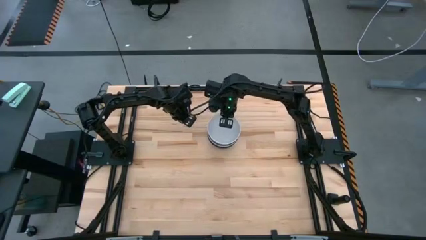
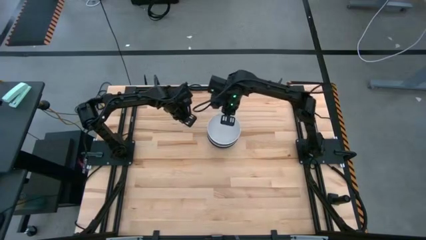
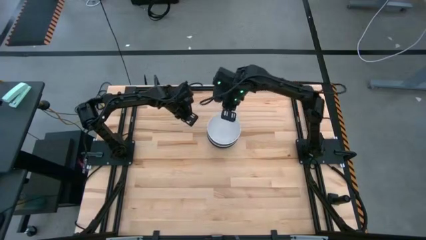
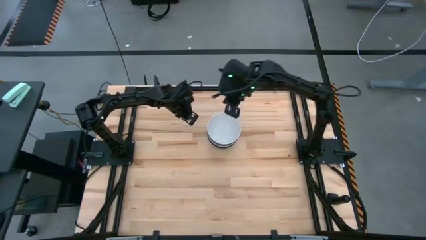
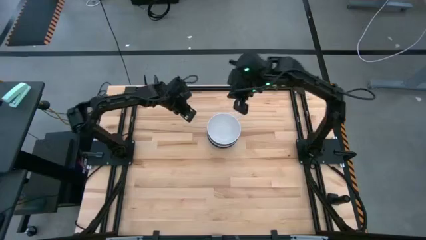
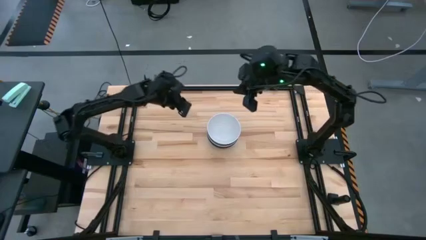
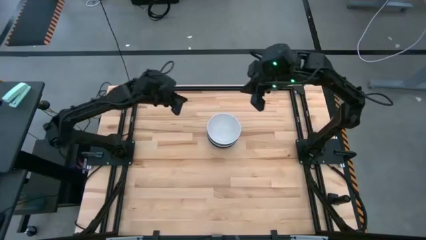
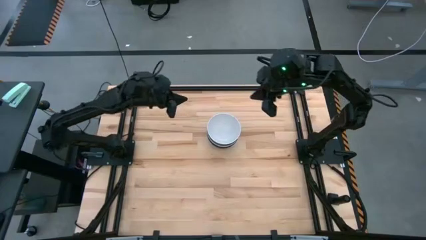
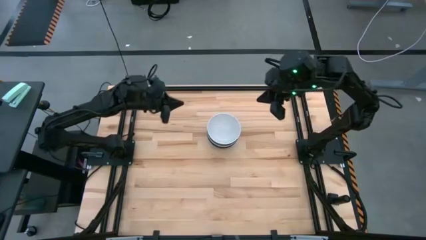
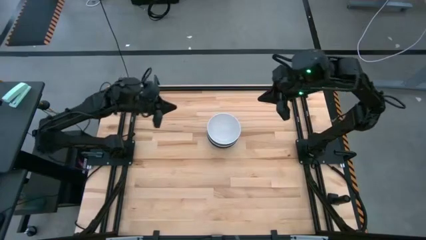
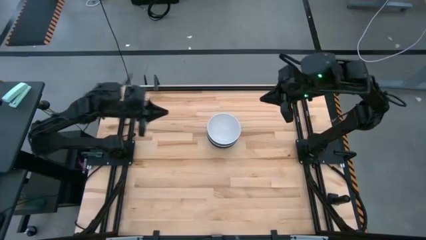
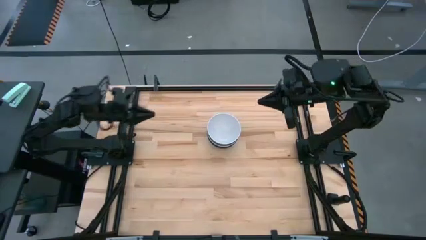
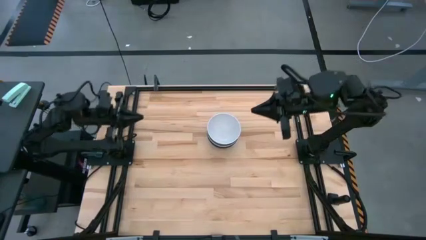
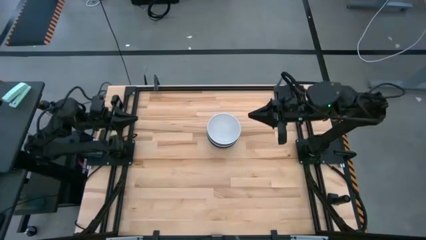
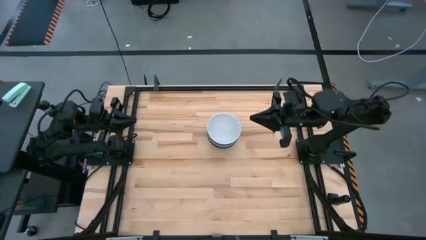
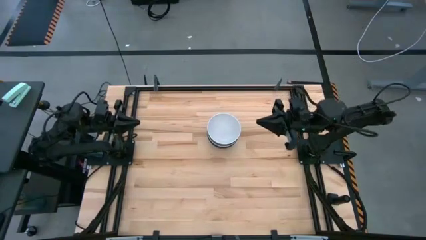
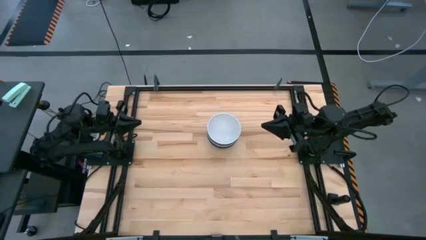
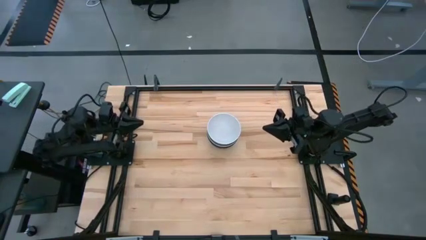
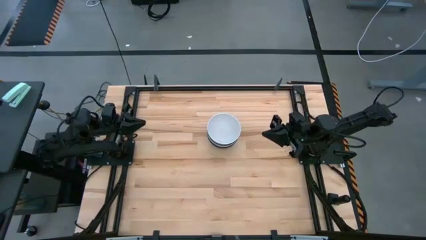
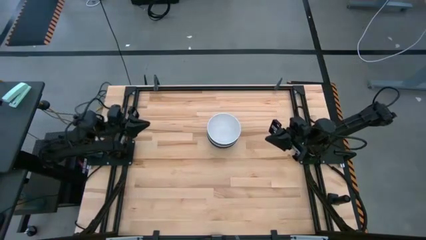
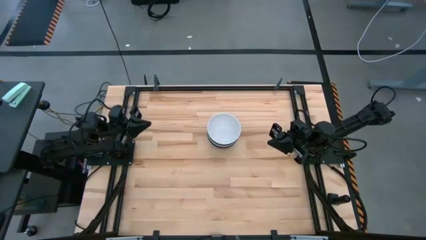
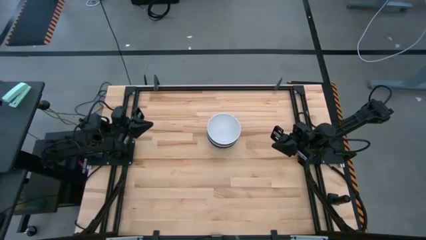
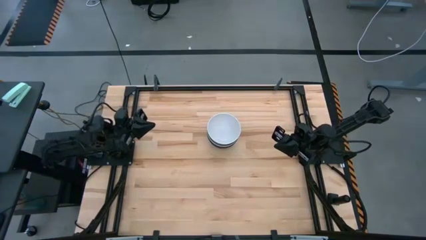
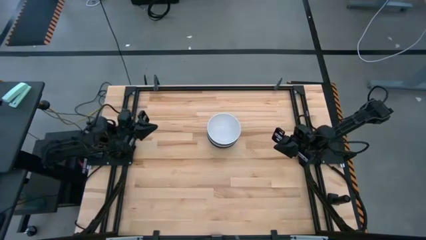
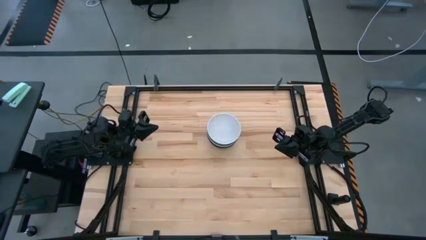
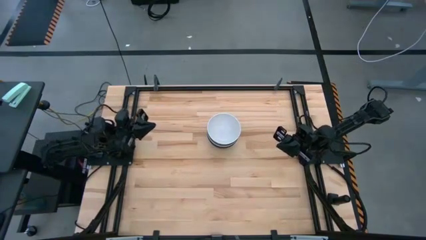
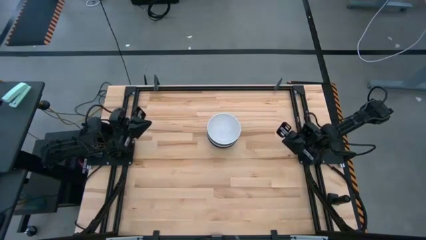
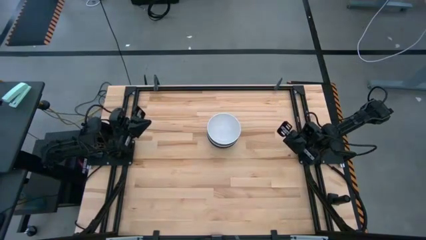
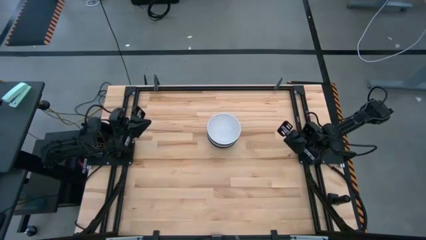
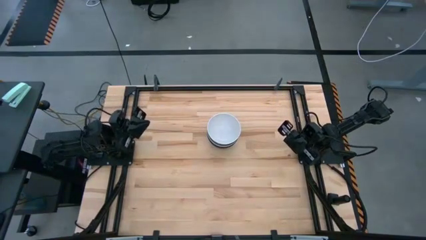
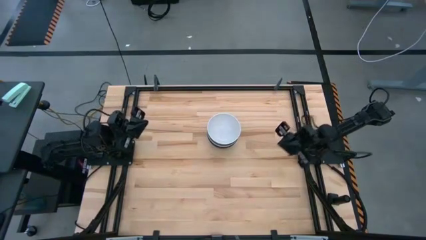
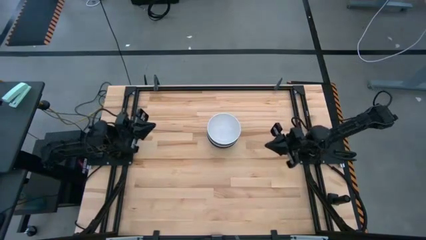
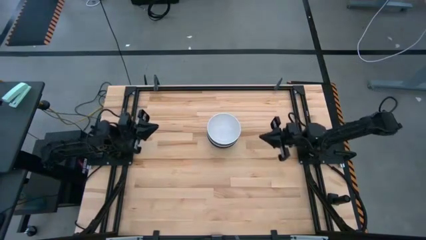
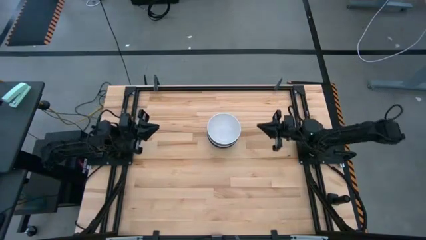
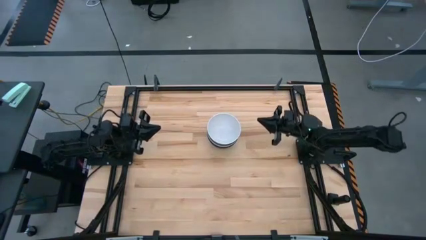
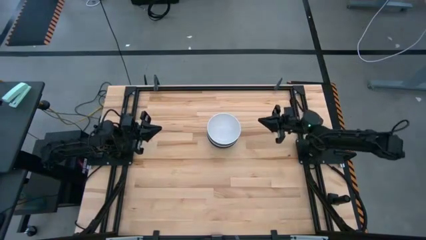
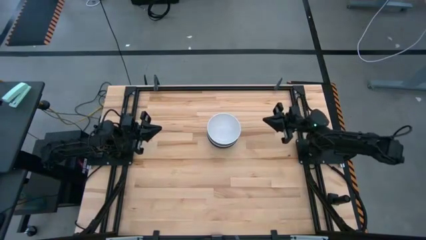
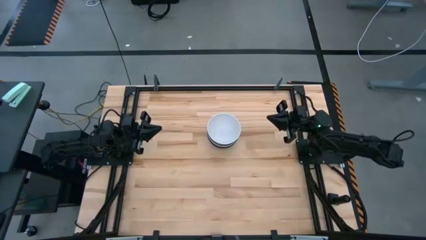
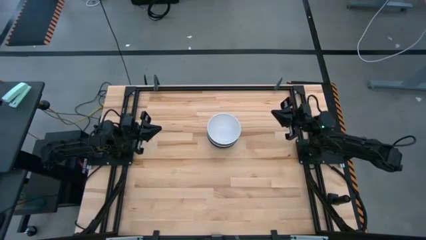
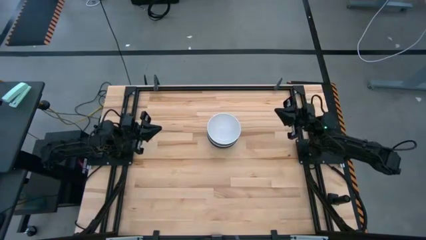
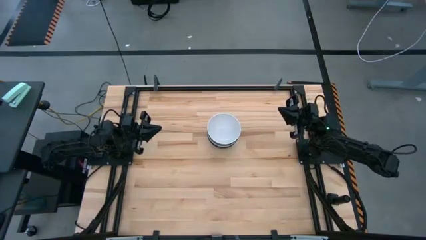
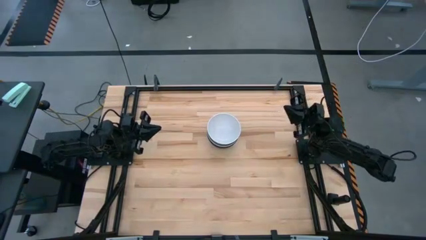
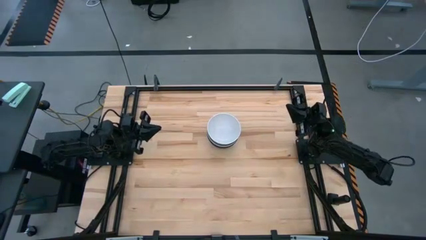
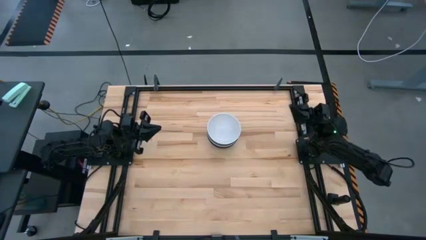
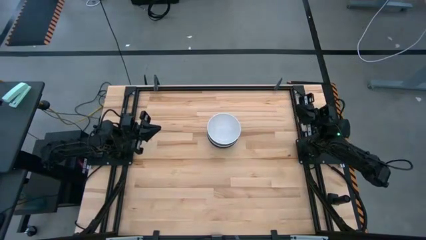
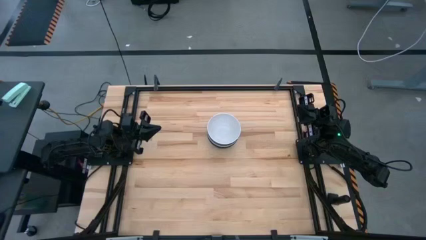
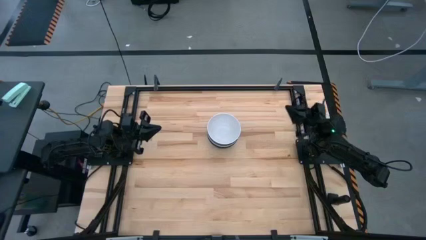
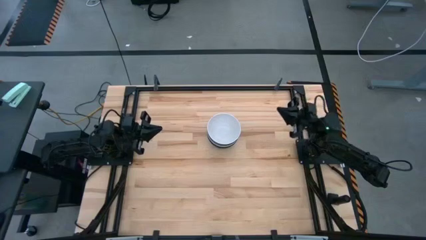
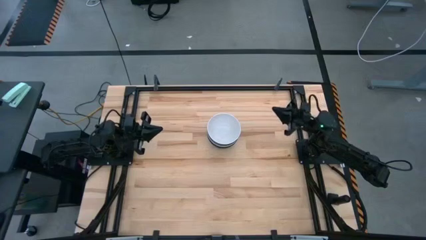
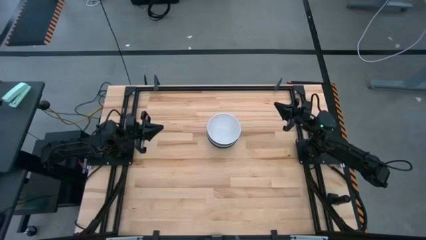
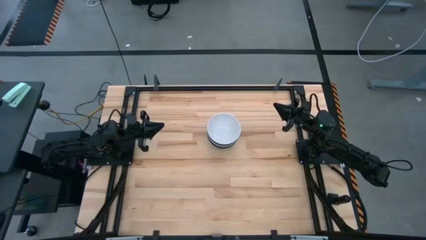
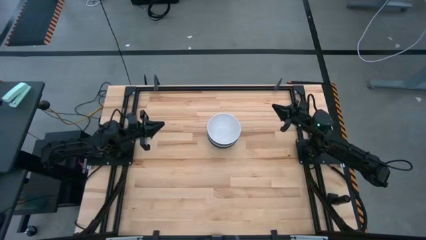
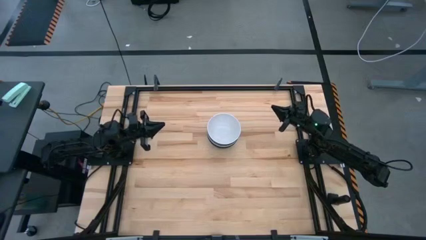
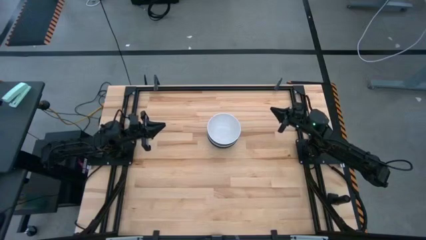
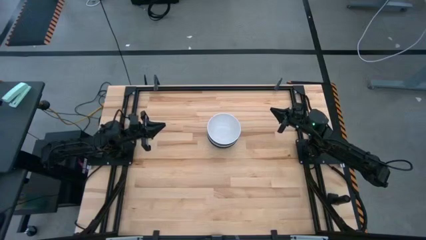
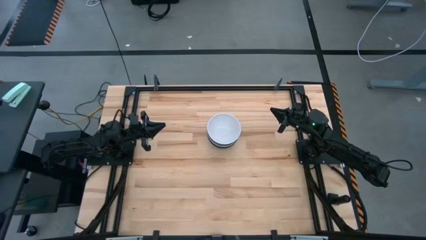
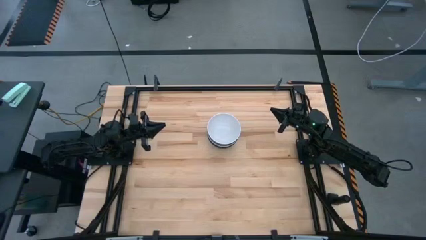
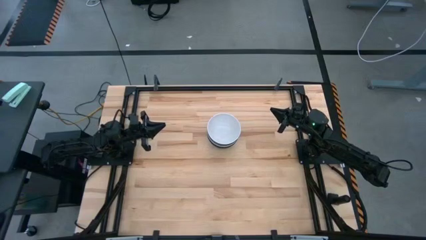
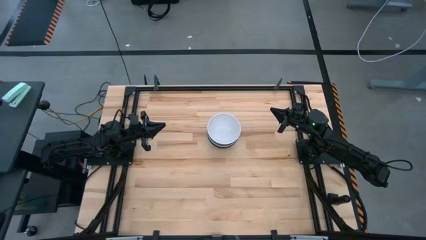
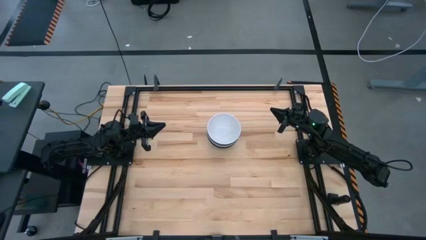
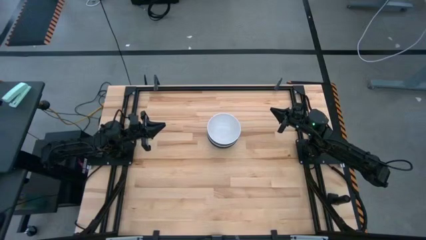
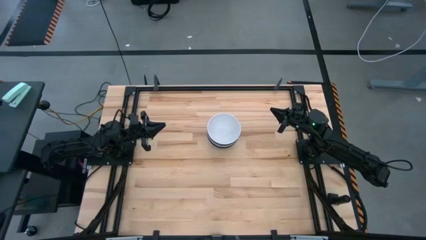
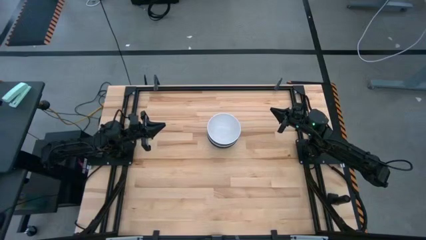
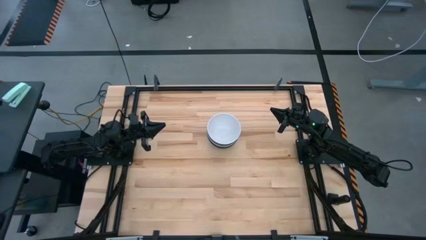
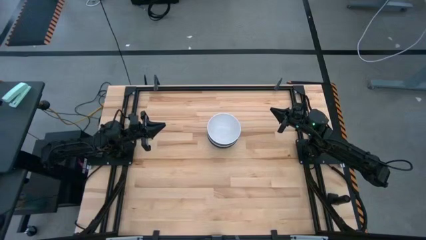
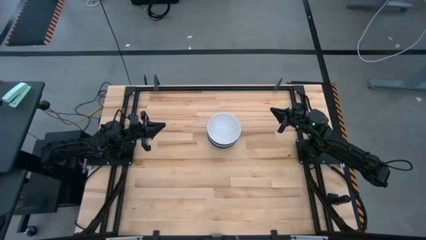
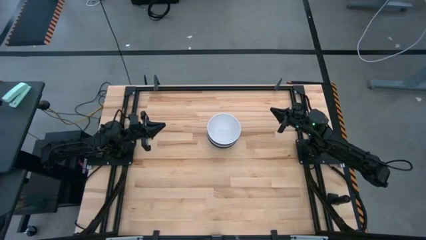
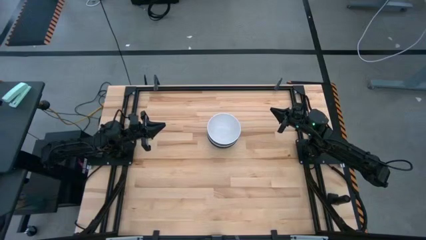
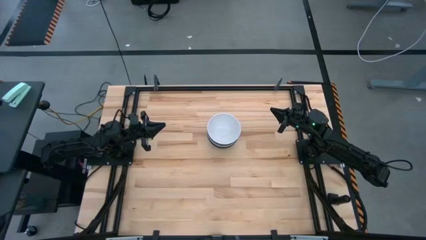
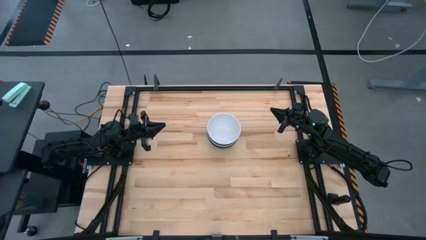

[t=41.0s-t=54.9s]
Task: Nest bowls inside each other
Return to Home Position

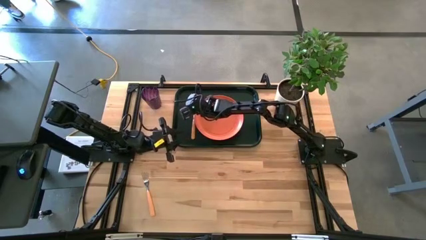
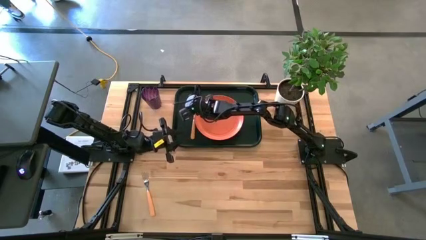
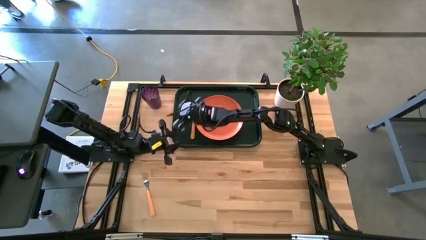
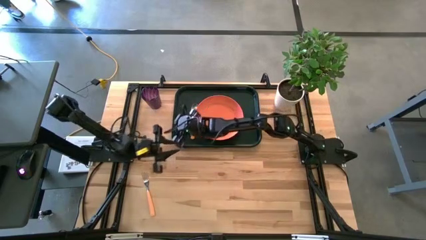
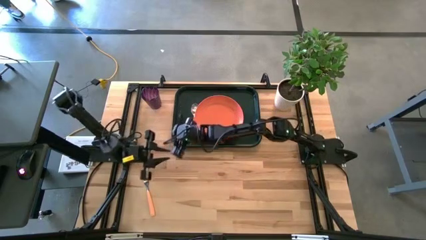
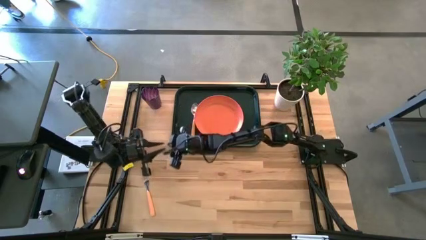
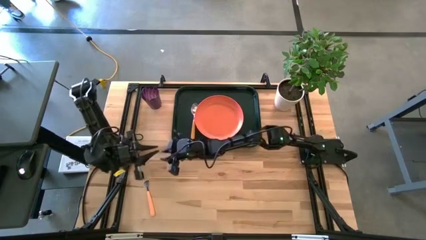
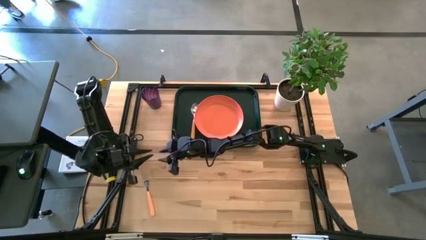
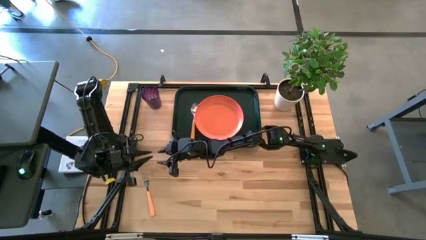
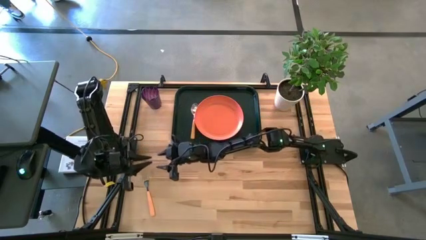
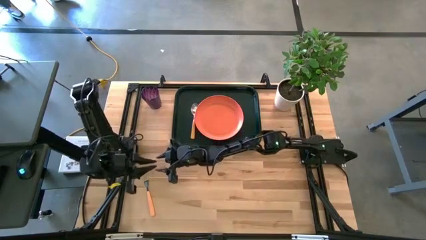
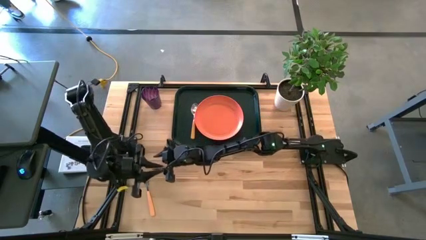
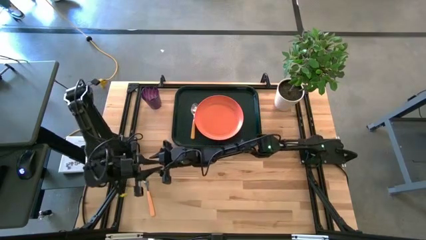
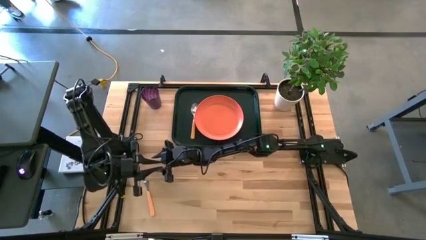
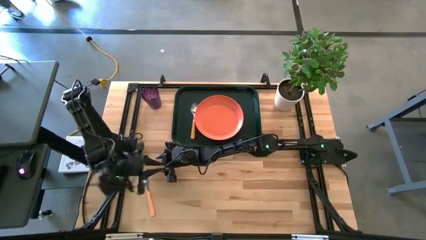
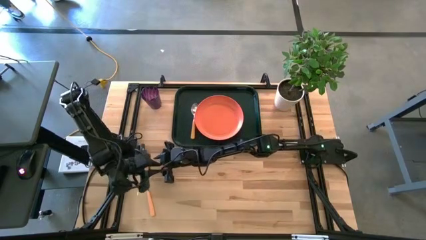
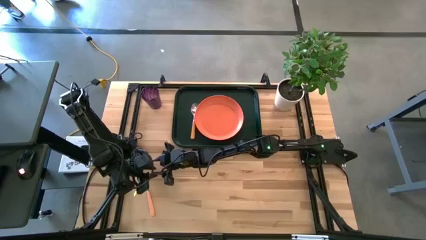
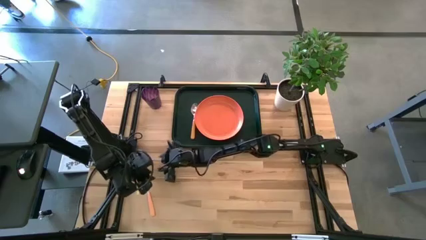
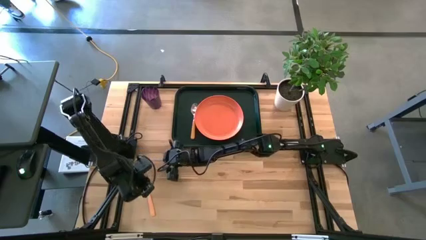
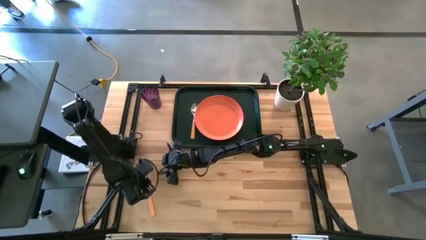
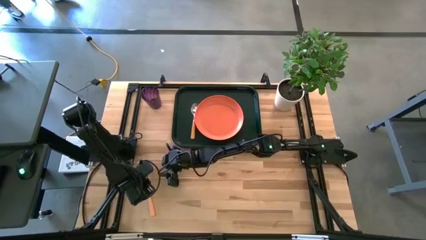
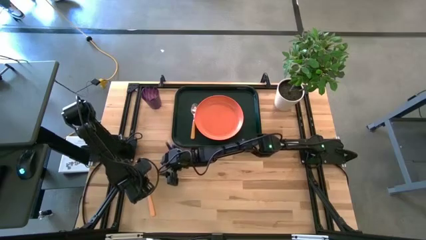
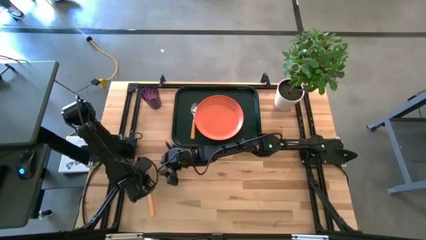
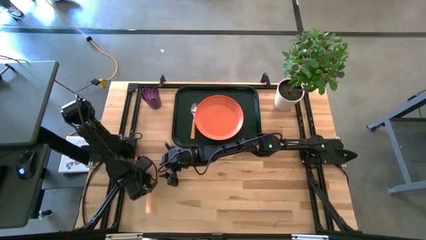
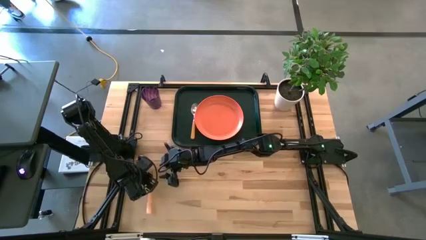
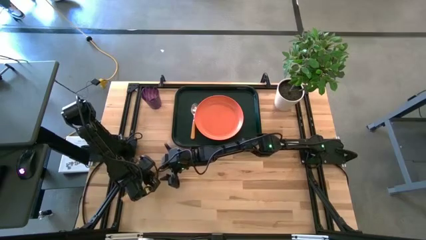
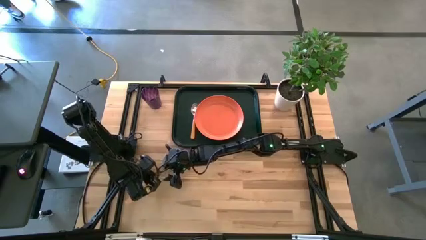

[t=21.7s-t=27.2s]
Task: Pick and place plate/cup/fork/spoon on tray
Put the orange spoon on the black serving tray to the left of the orange plate
